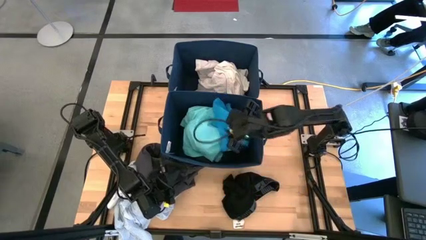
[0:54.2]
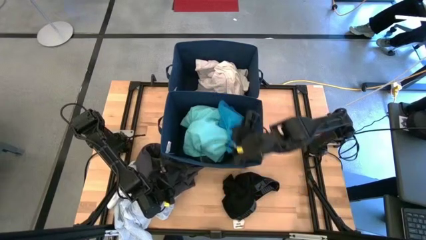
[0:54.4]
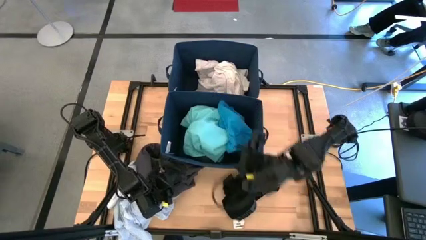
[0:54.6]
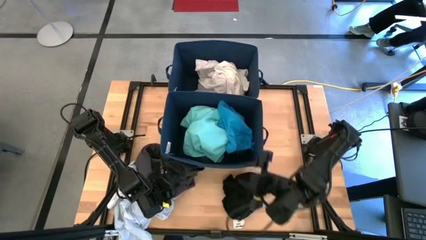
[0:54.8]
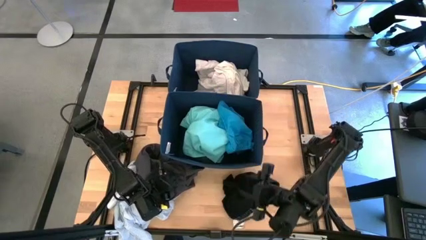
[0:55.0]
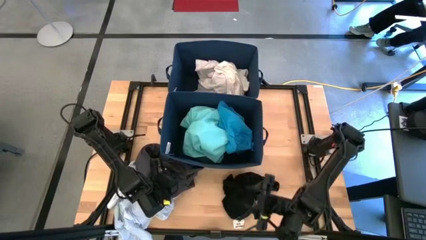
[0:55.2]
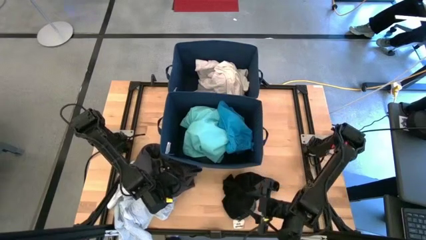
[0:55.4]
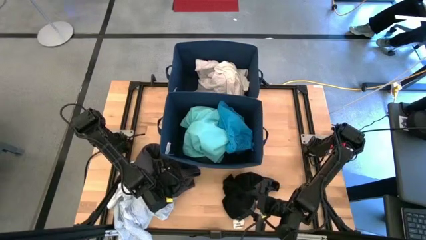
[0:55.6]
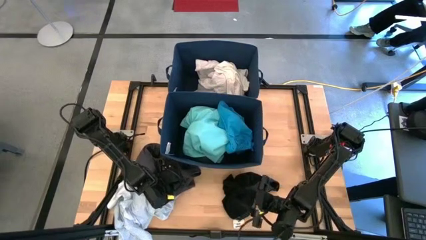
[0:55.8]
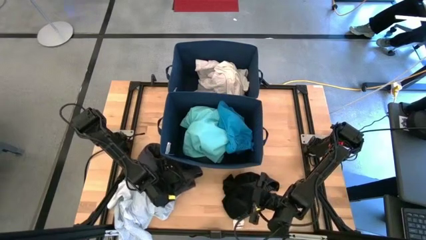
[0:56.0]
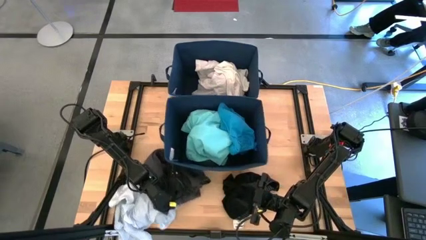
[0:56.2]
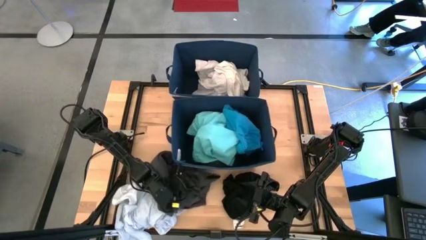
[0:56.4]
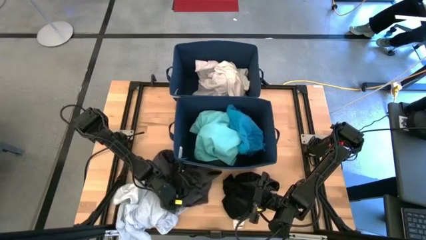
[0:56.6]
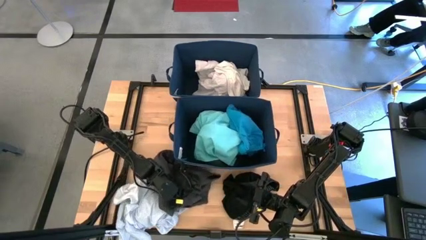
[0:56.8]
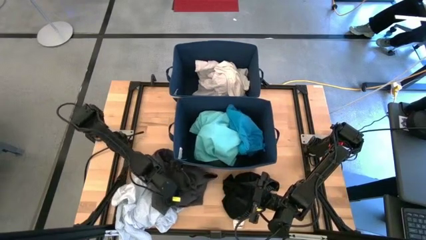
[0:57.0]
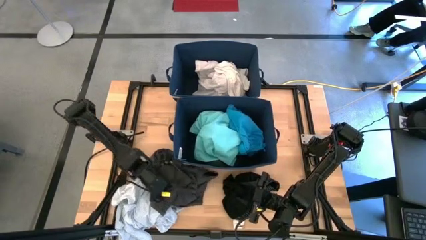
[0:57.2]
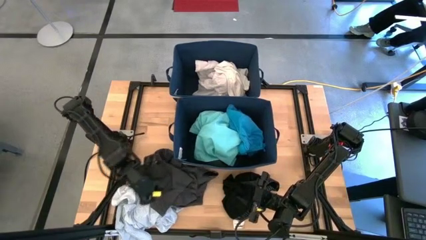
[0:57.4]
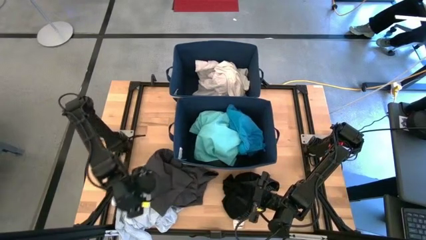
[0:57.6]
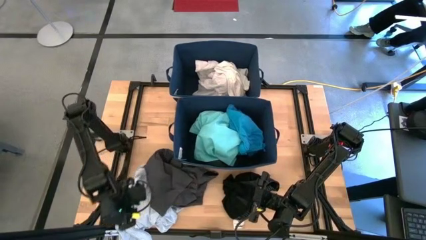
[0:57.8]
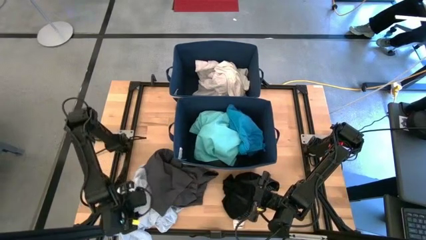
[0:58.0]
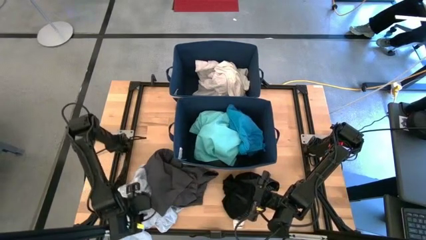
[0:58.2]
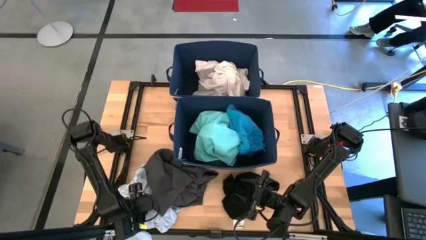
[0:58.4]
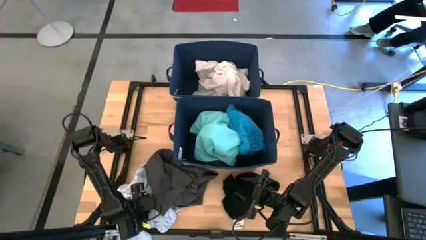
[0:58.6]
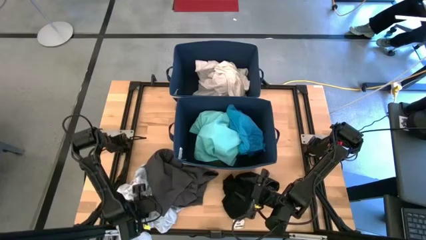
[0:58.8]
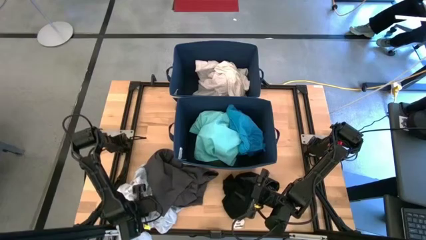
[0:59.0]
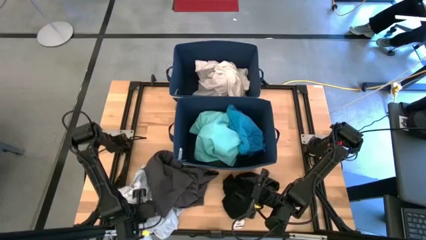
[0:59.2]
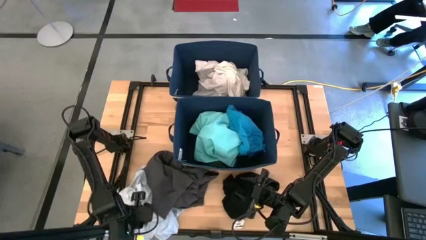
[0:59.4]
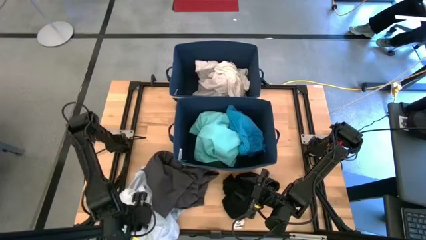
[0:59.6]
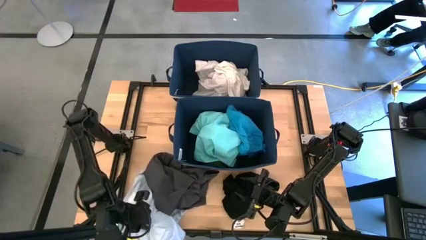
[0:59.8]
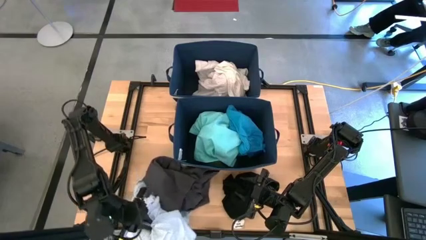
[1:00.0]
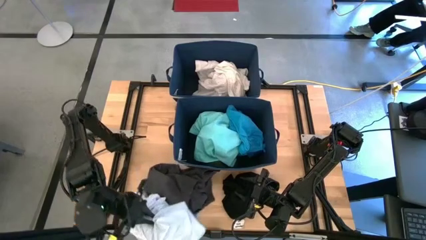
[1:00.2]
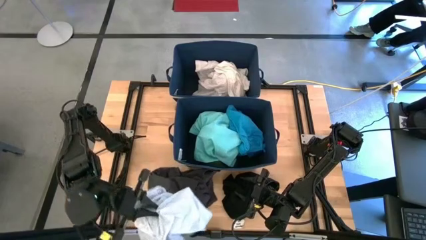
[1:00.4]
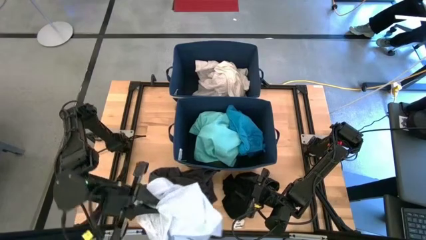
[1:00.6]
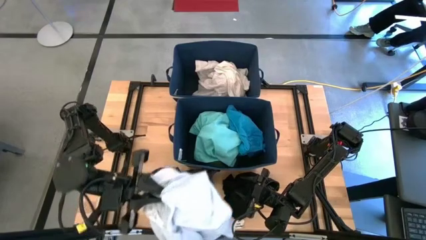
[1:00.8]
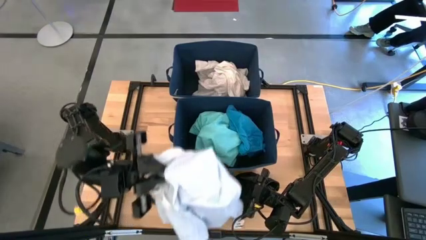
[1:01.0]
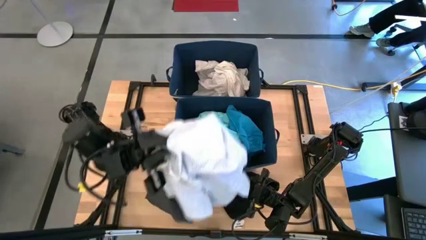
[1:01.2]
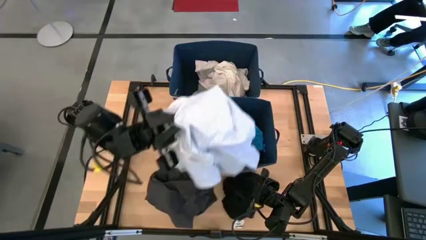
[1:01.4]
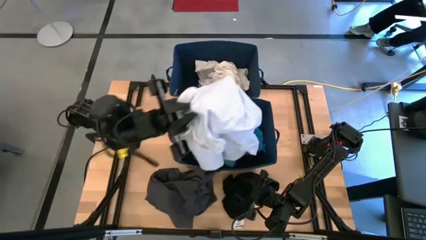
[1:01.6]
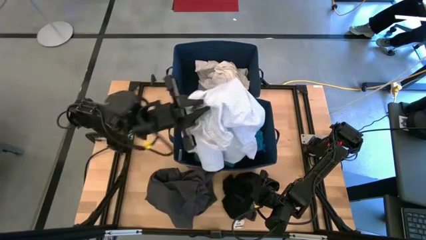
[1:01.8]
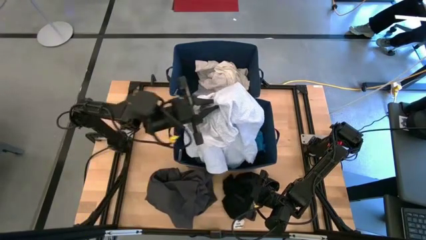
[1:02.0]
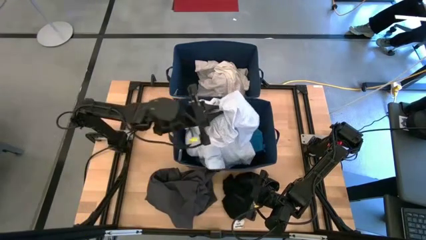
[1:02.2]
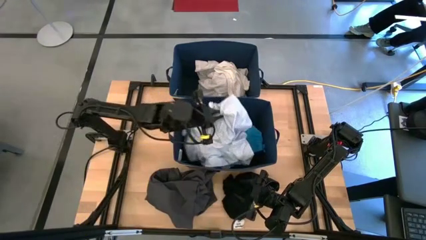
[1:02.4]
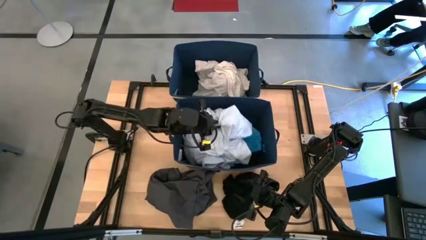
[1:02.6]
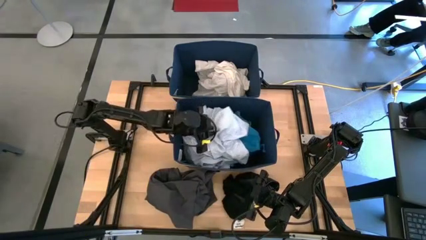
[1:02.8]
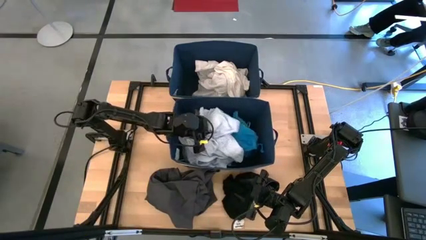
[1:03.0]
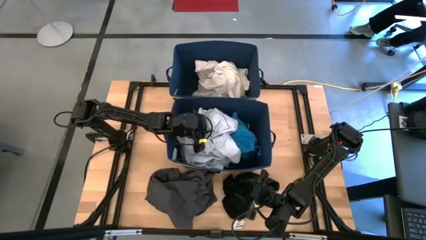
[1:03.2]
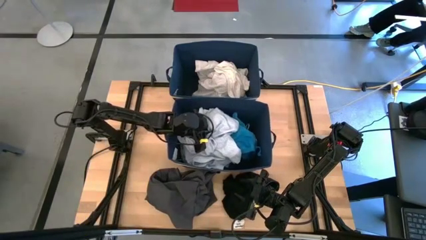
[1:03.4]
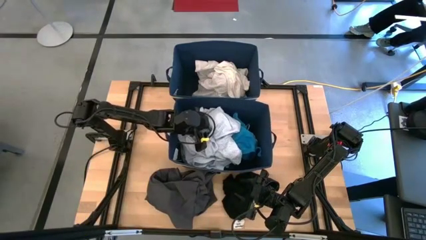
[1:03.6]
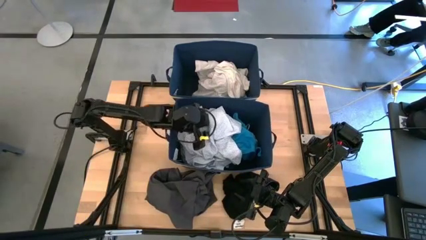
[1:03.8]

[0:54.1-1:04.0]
Task: Sort clothes
Put the light blue patterned dress into the bottom blue laundry bin

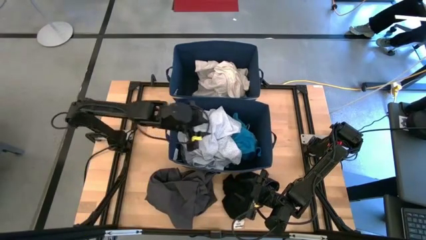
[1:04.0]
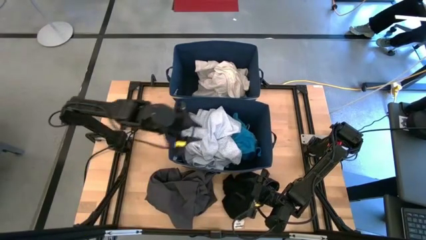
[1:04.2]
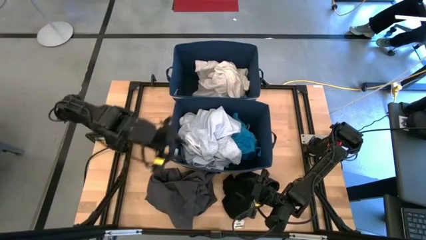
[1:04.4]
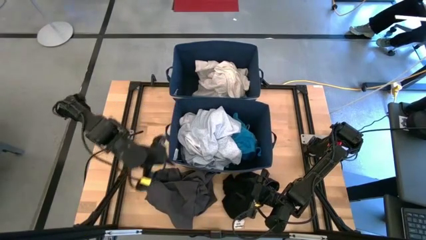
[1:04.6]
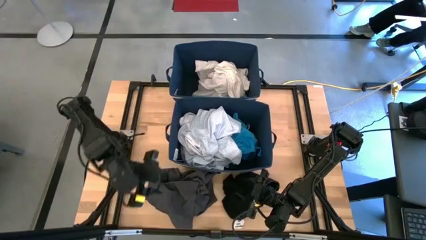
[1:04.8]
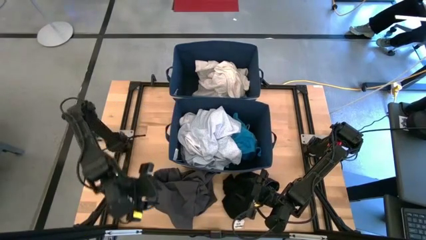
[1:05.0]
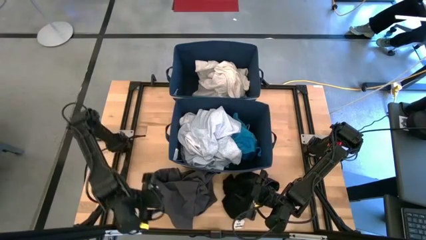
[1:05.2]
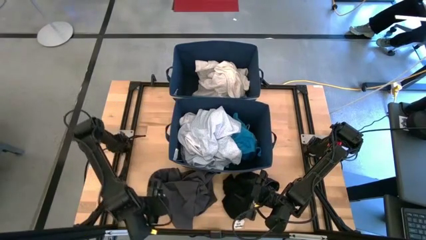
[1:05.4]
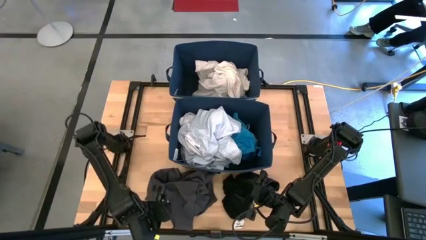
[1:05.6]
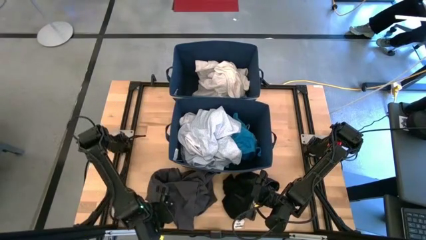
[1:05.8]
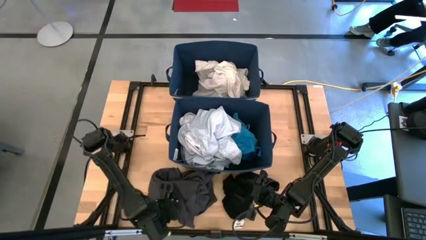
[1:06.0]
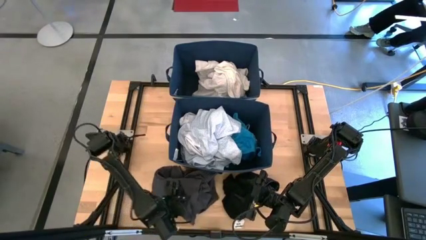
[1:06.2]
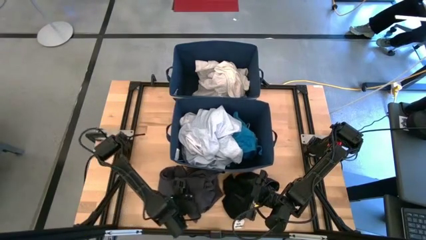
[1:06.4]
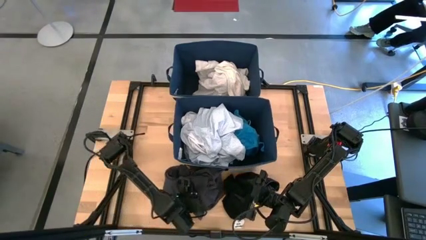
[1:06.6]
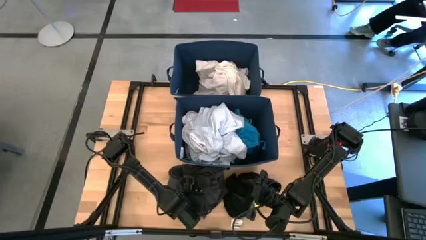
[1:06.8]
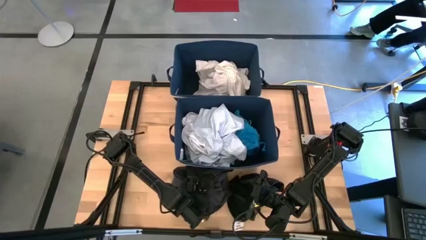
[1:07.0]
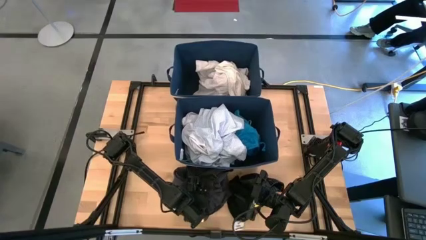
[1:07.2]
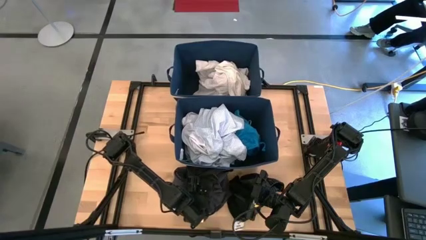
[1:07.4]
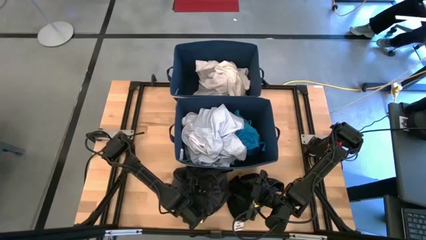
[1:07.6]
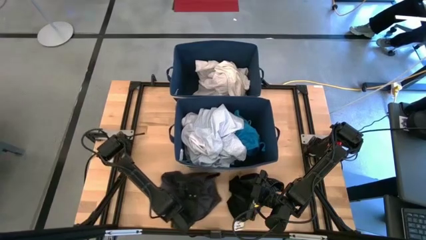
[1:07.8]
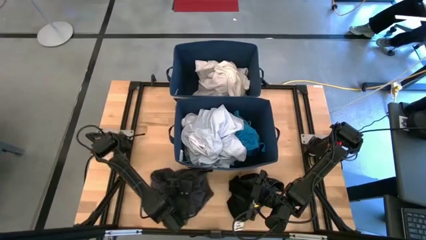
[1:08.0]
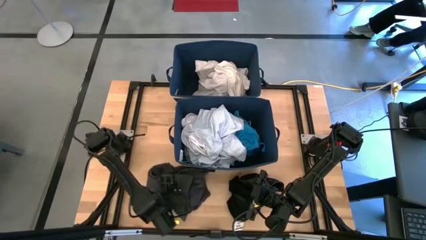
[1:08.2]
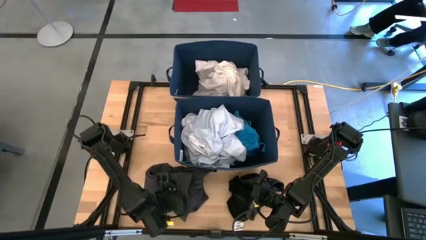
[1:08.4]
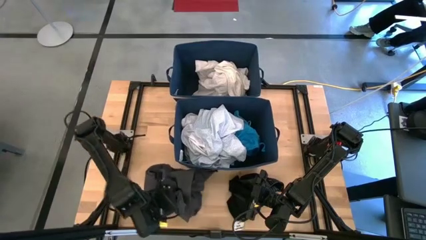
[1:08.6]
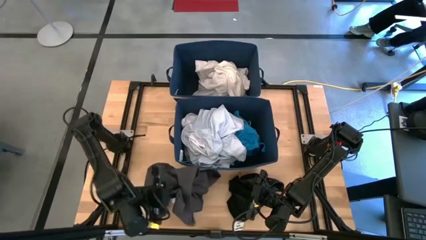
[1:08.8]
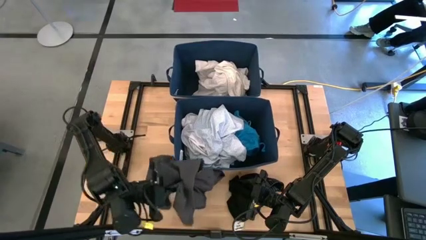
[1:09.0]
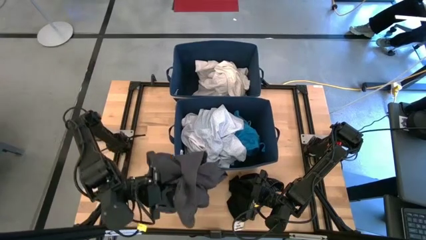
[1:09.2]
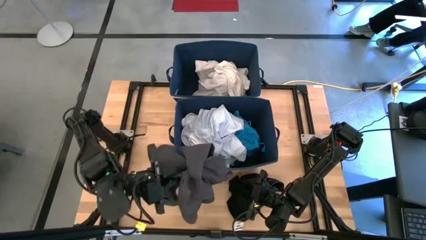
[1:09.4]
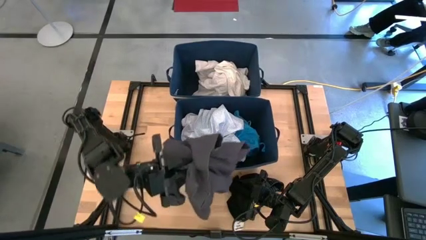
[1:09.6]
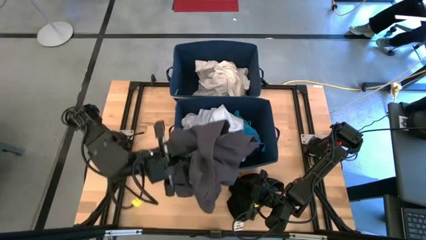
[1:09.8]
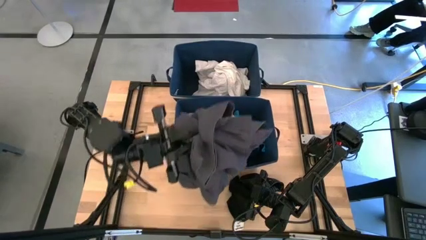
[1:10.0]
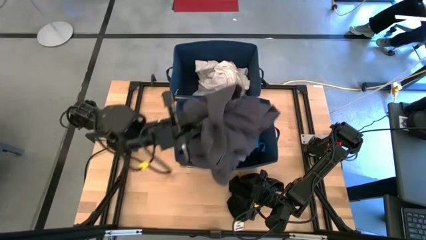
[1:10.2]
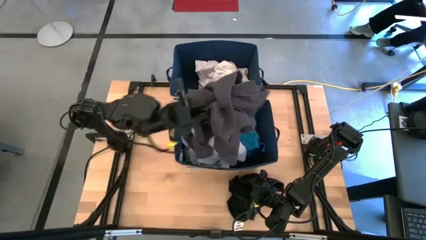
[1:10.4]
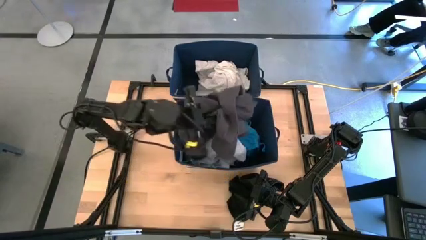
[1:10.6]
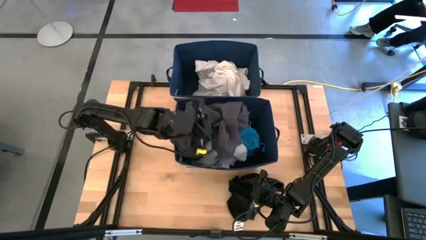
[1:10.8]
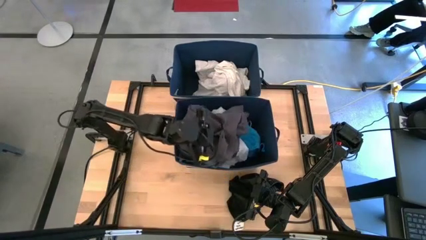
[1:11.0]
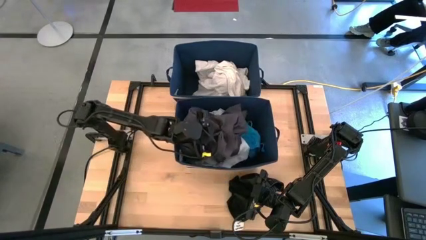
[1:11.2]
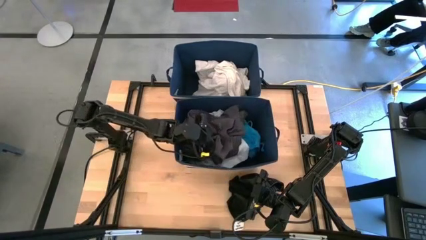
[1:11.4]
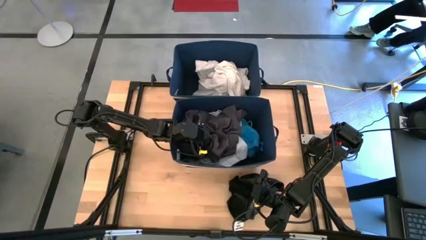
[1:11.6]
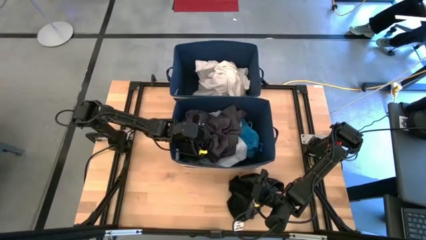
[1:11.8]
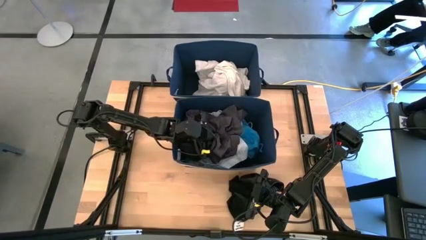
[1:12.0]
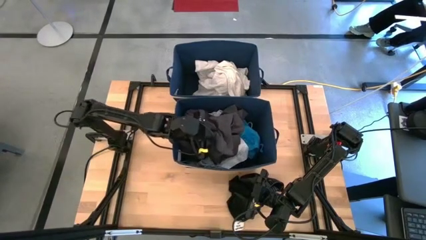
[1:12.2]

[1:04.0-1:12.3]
Put the gray shorts into the bottom blue laundry bin
